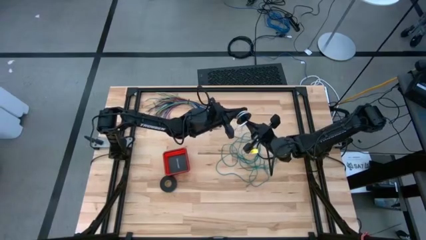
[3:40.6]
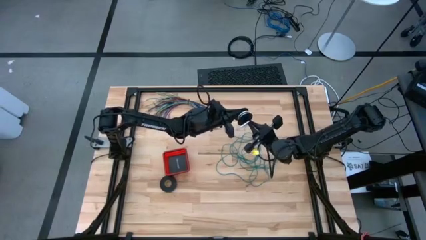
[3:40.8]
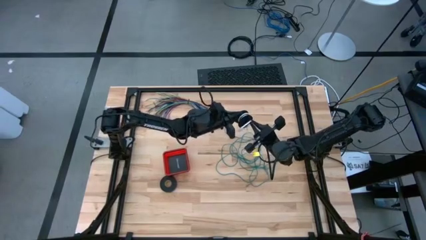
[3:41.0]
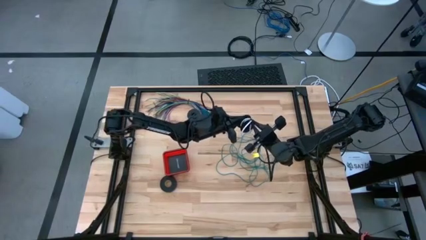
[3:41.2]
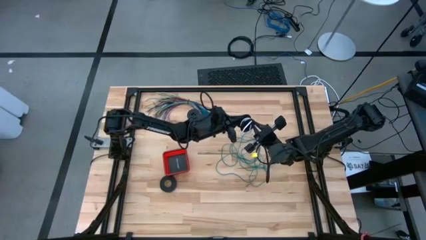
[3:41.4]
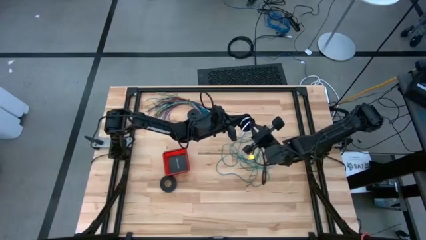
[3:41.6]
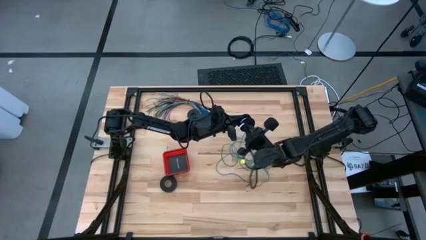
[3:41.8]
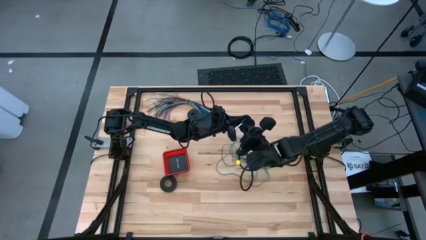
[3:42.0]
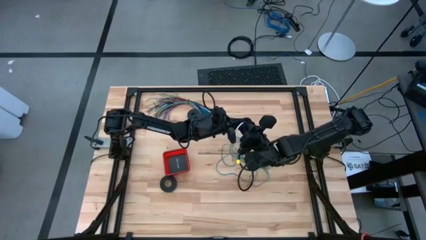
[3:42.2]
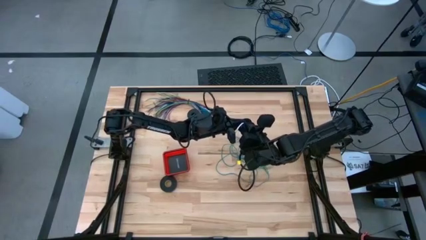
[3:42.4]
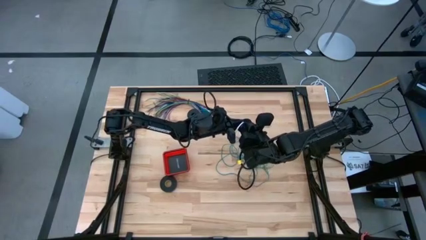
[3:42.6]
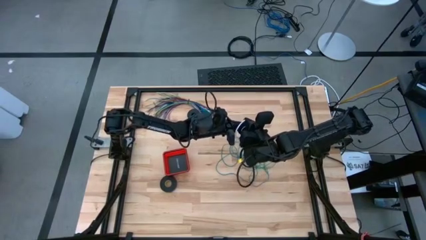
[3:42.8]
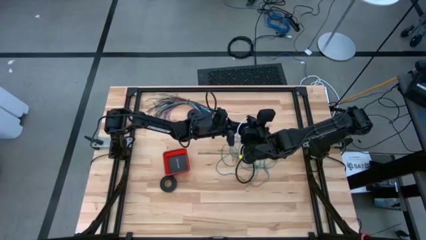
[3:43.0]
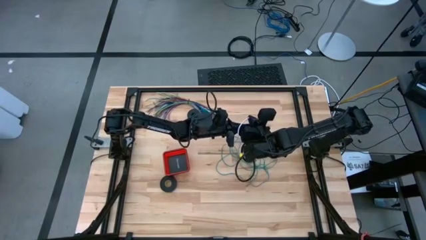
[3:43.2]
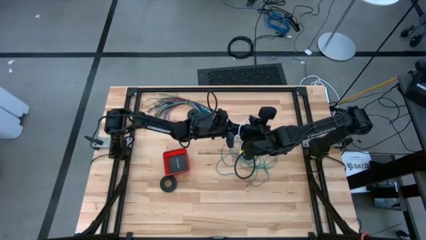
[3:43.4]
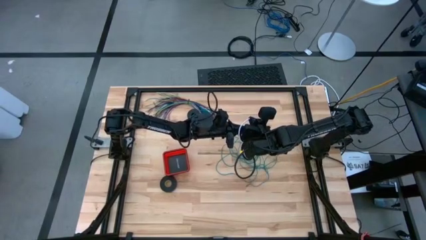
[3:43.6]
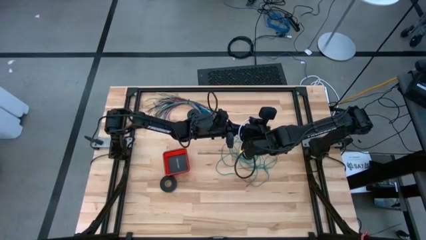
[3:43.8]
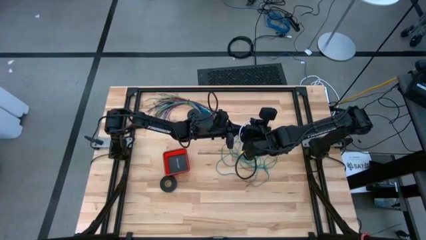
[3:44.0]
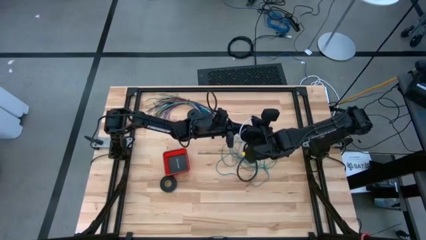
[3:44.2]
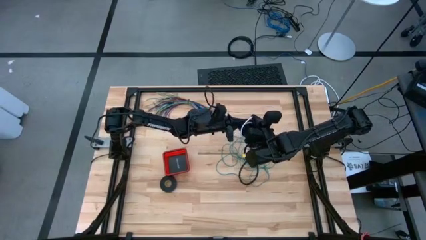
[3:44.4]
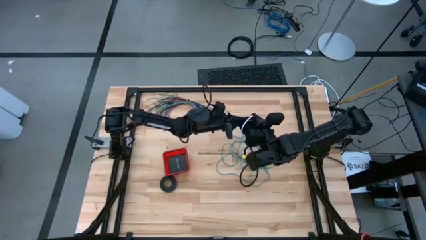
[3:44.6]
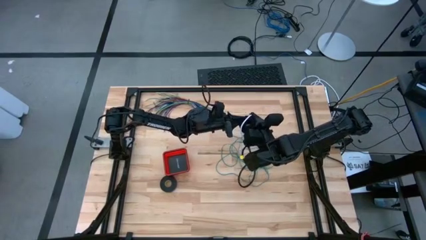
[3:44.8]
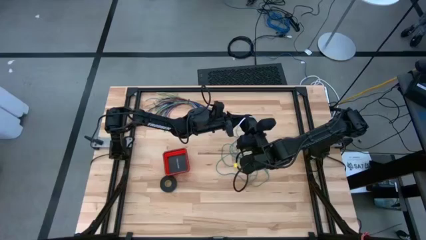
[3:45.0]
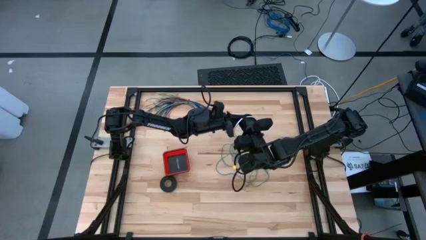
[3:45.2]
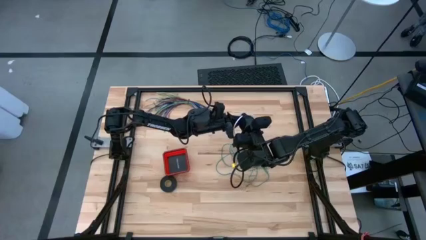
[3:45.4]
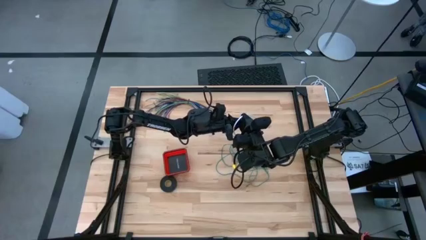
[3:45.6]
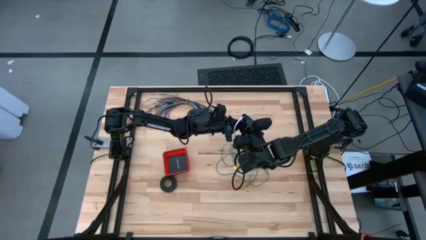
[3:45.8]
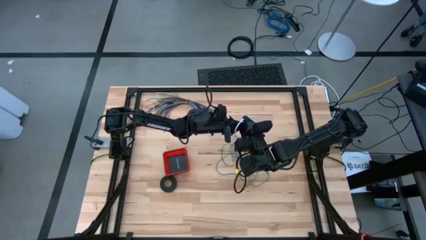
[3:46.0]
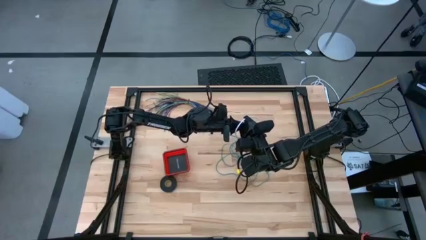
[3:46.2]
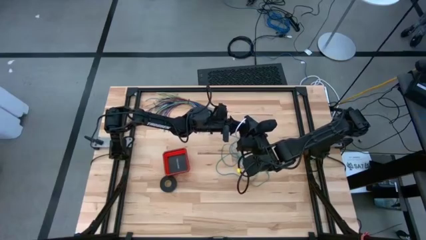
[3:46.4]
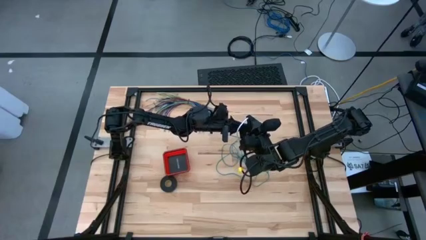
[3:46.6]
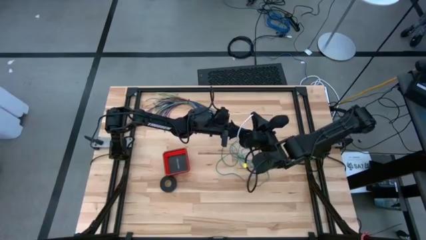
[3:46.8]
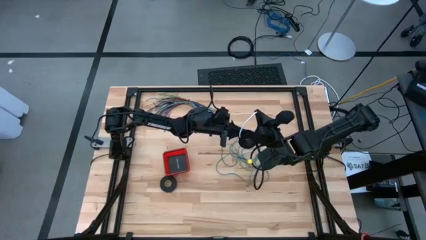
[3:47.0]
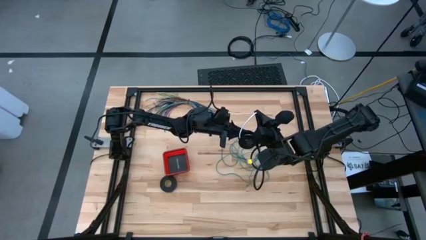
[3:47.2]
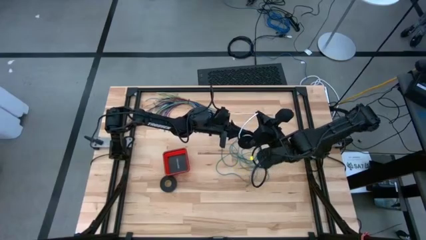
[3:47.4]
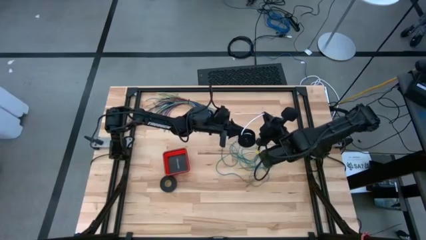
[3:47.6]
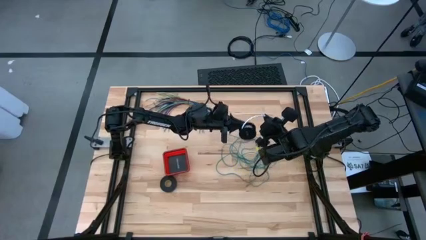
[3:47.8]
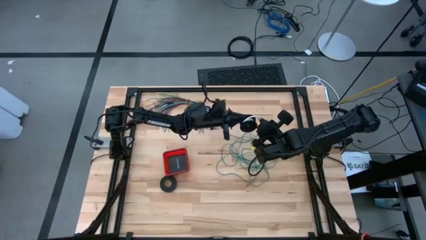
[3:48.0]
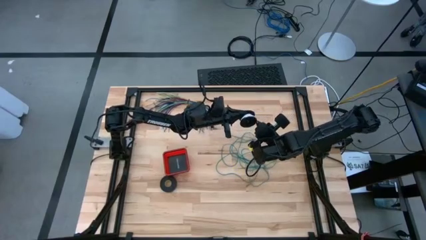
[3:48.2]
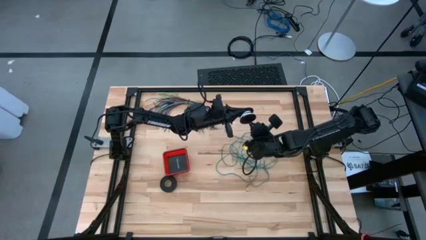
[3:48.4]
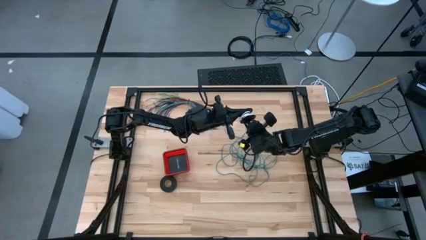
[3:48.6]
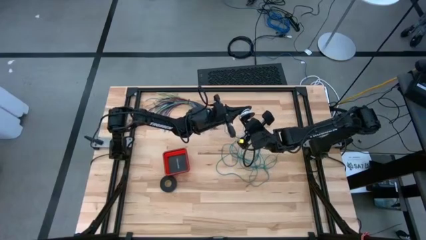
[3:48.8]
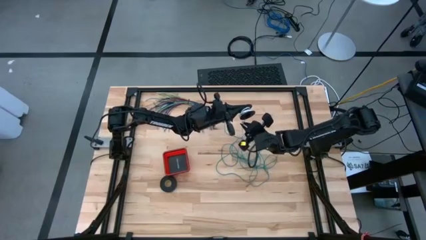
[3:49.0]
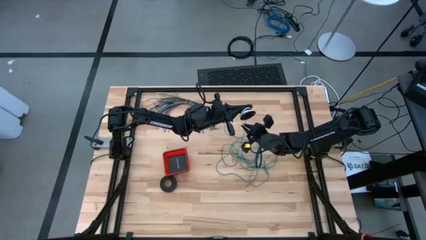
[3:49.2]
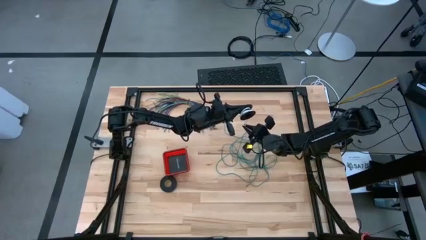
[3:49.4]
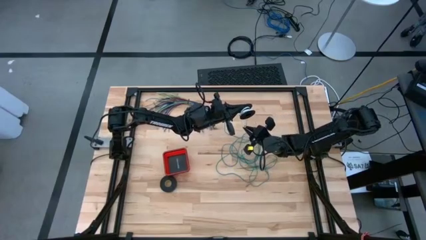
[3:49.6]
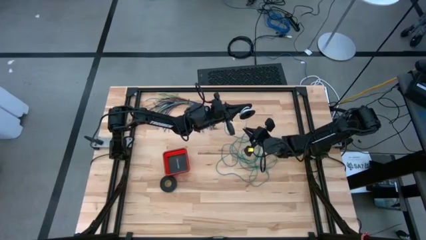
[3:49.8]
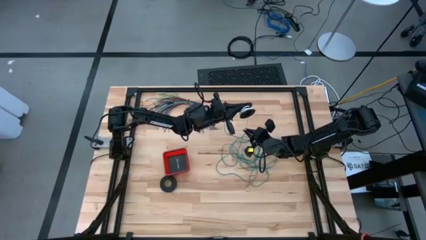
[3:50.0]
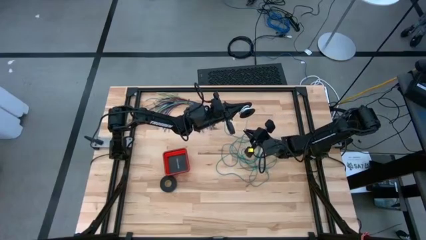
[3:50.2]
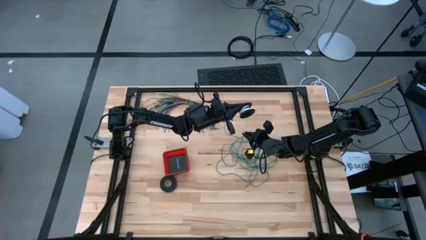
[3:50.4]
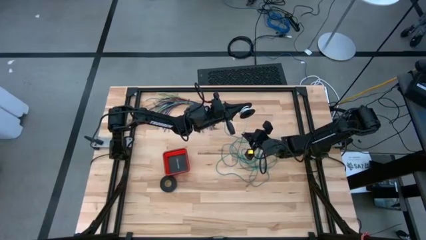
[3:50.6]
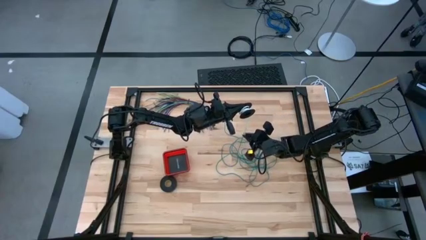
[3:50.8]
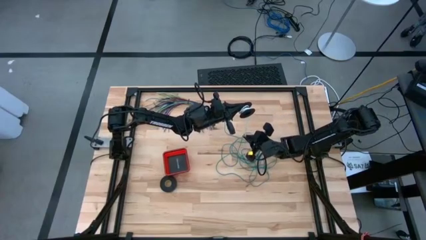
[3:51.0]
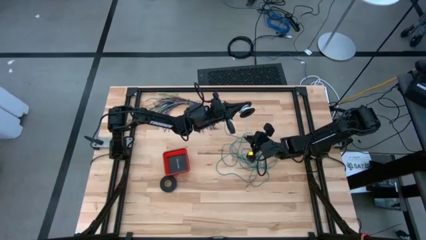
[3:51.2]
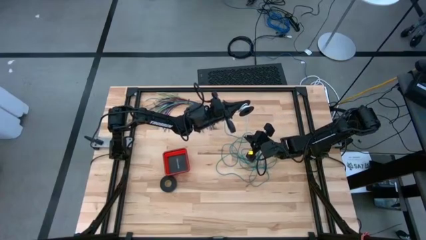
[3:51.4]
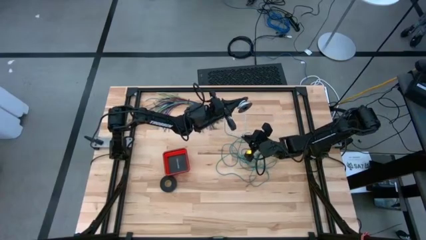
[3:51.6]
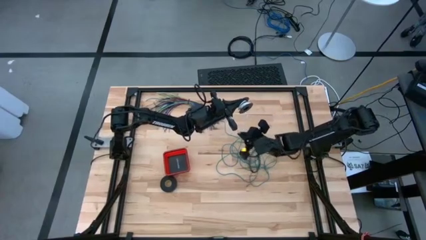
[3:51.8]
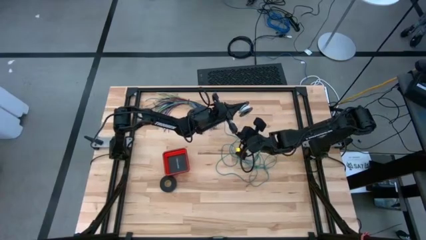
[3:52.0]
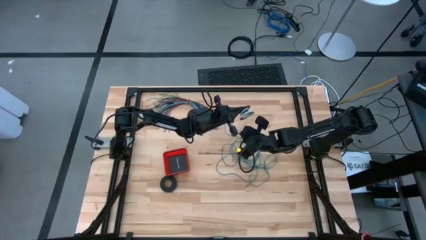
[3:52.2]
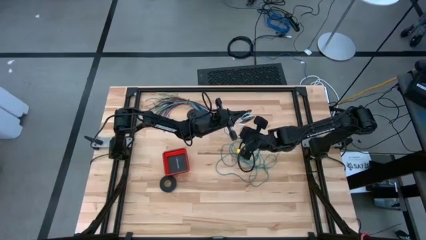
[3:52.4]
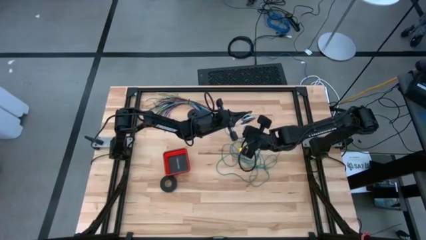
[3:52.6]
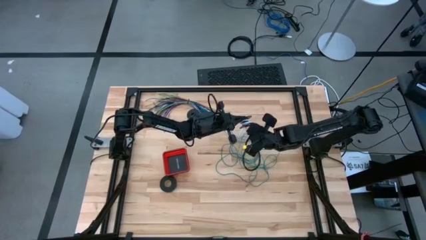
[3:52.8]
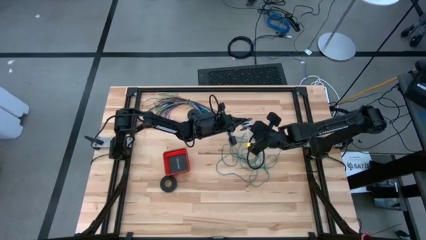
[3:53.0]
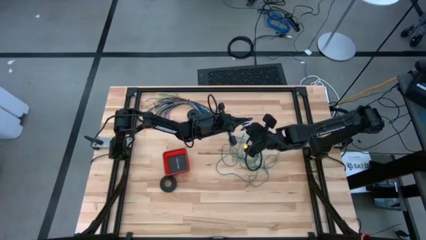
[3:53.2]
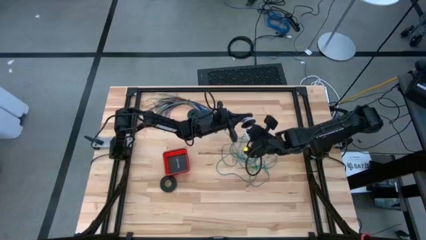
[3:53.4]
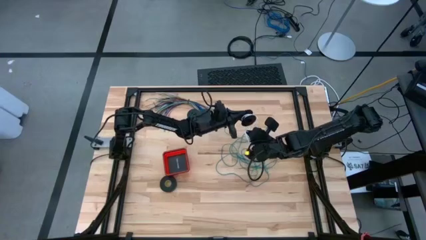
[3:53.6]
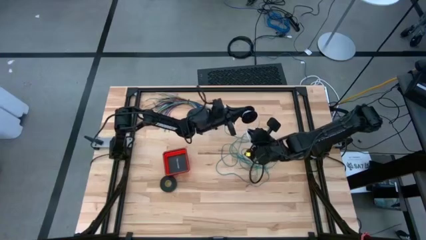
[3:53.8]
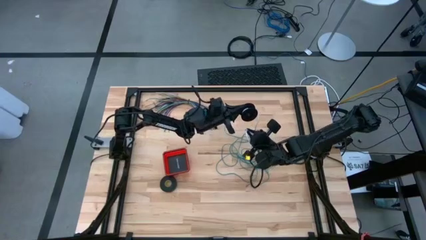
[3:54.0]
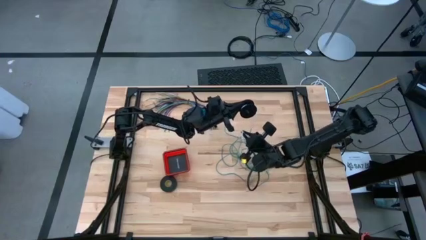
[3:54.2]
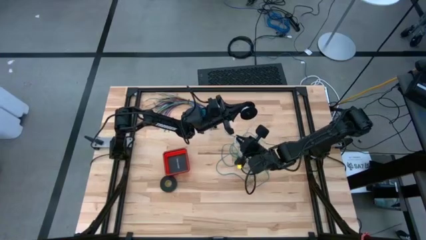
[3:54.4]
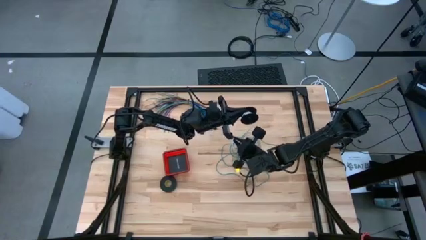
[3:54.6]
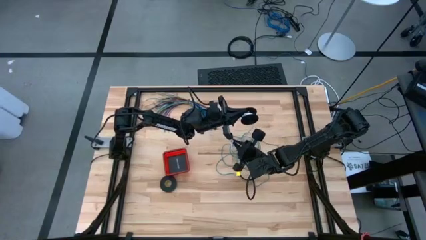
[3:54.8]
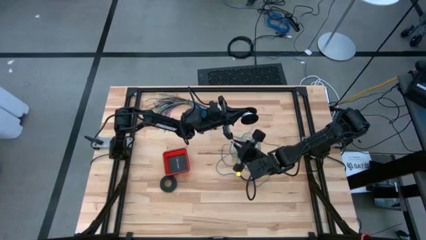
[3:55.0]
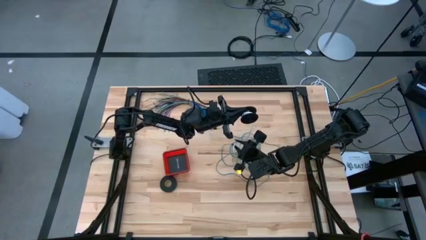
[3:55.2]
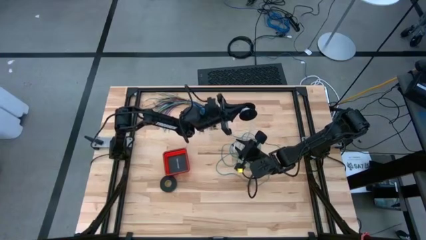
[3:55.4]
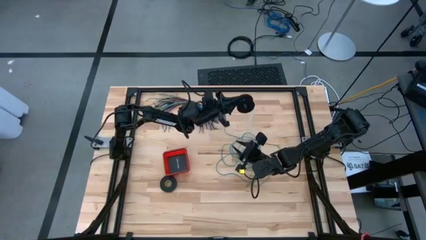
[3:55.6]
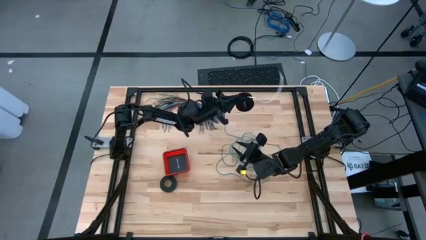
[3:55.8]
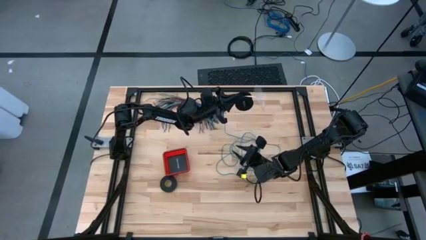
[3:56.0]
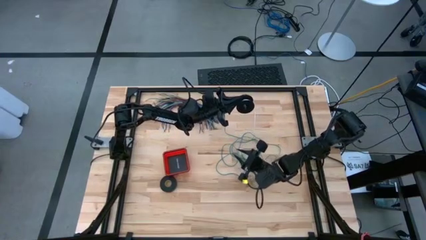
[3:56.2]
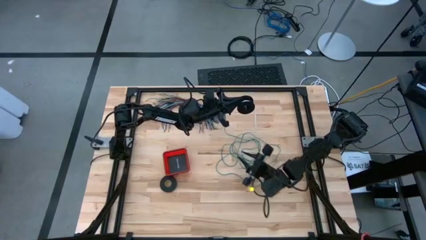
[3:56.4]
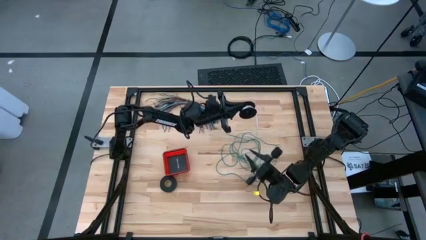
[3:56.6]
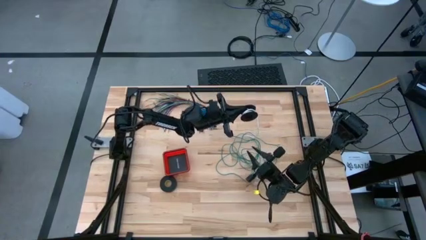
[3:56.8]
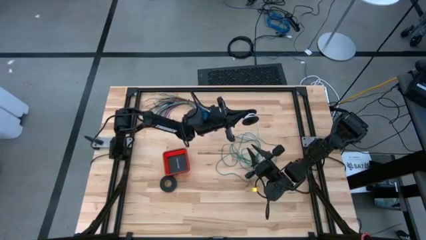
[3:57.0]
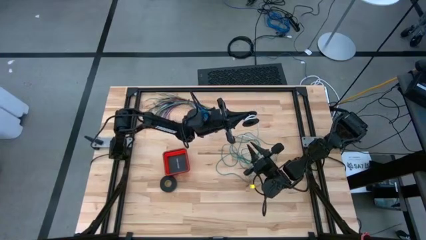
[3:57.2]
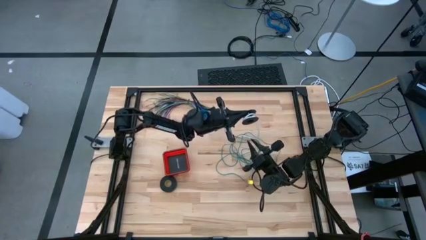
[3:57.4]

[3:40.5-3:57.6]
Task: Coil cords
Coil the white wire onto the spool
